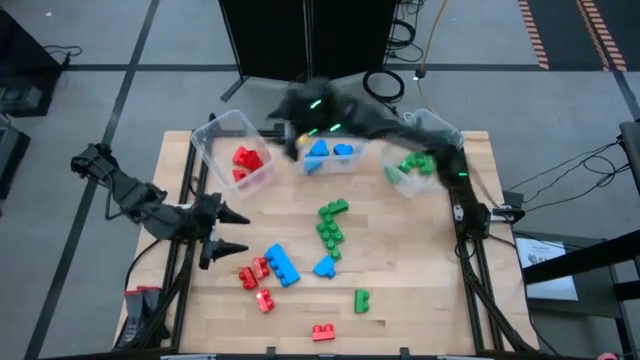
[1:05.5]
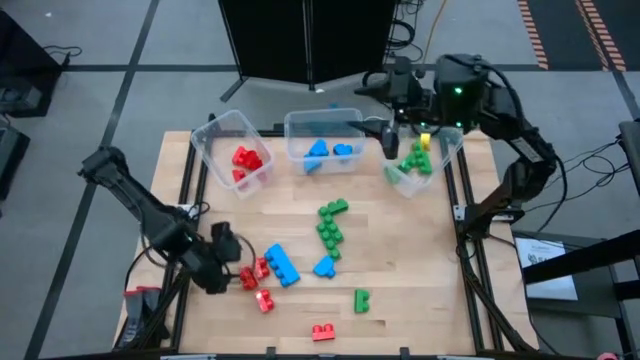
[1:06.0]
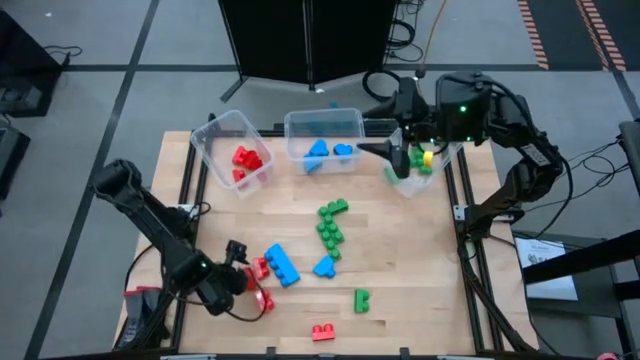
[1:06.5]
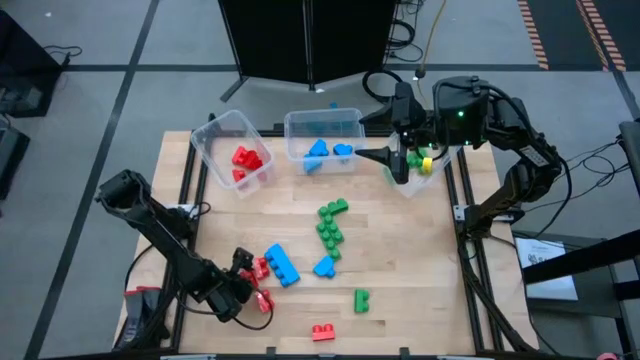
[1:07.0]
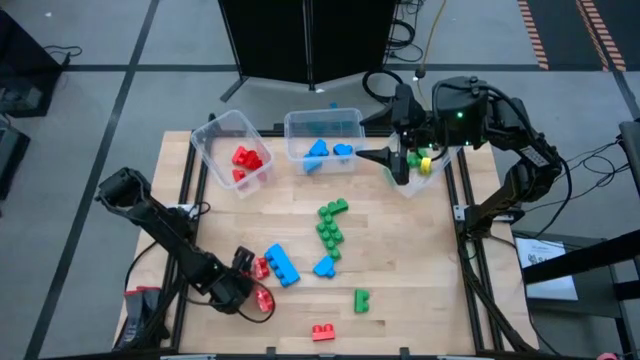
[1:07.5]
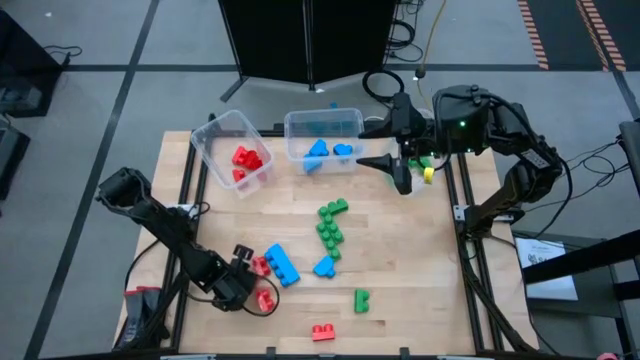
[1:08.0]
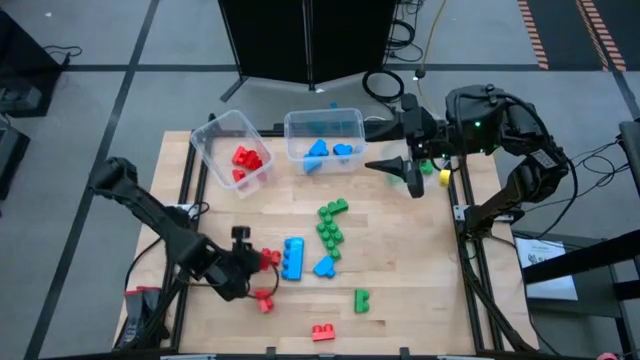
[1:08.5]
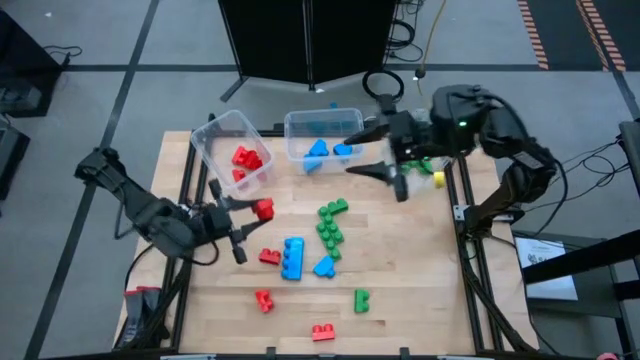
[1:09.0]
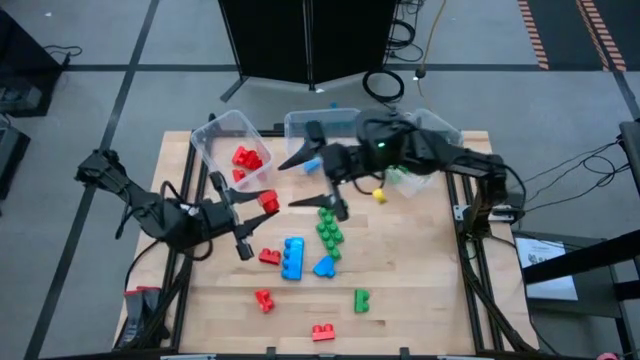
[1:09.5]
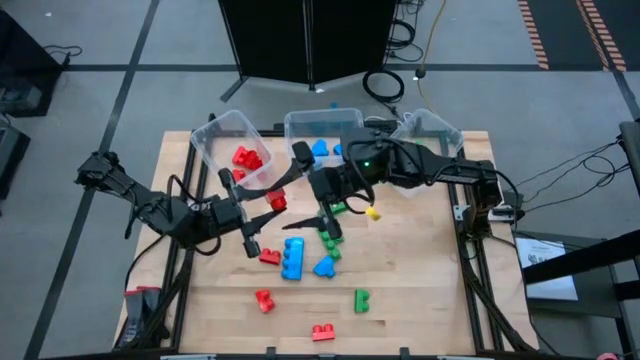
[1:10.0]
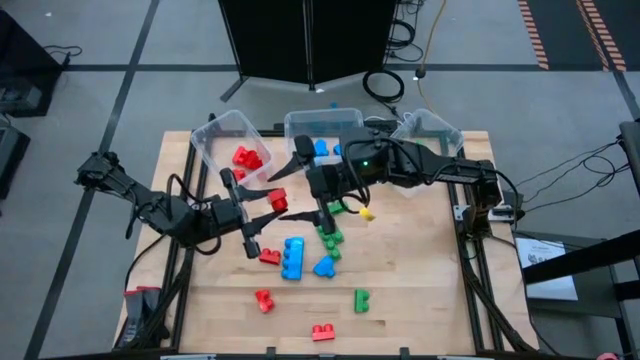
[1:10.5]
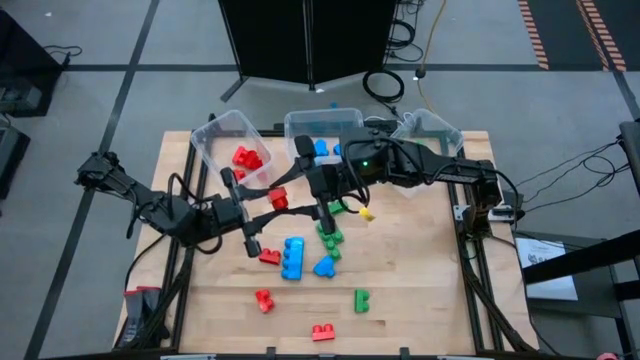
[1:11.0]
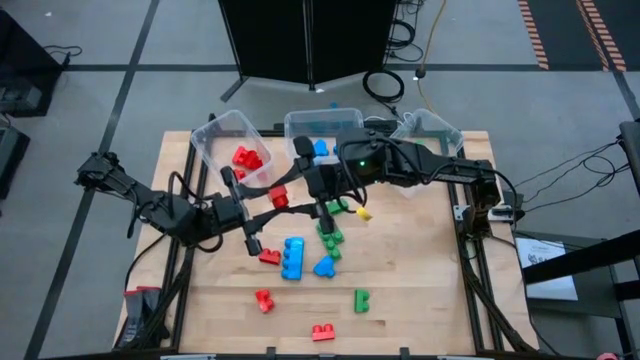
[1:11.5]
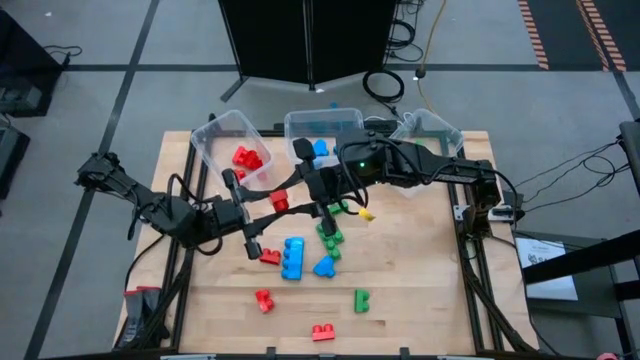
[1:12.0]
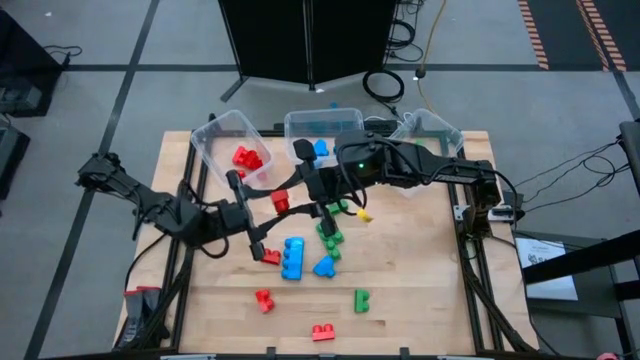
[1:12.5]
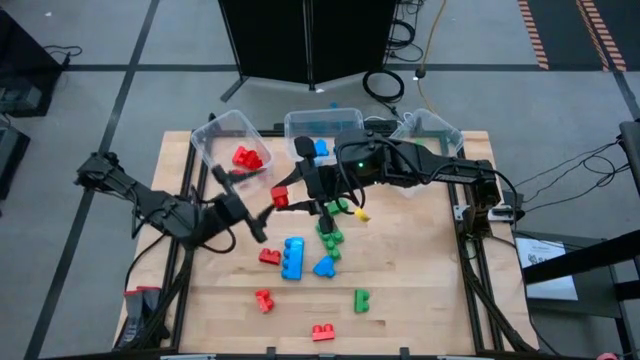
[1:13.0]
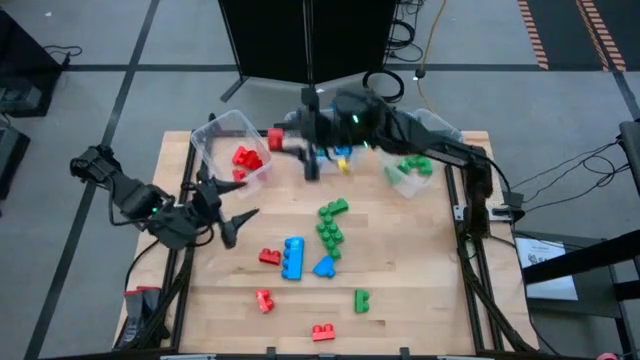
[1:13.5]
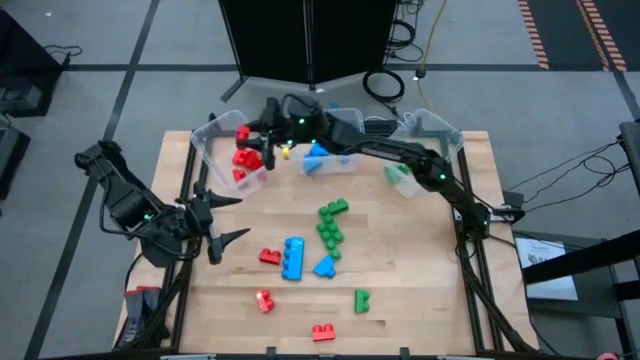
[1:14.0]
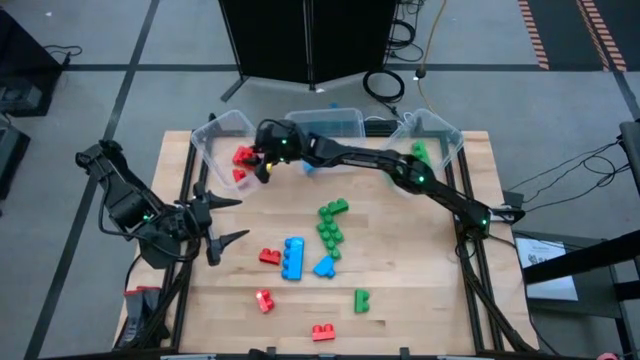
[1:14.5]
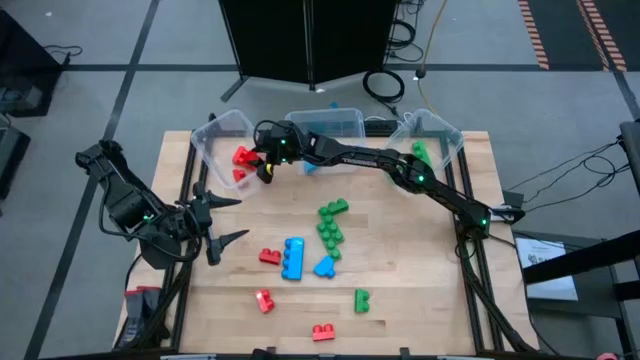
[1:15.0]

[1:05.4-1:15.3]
Task: Sort blocks
Put the red game piece into the left transparent bin

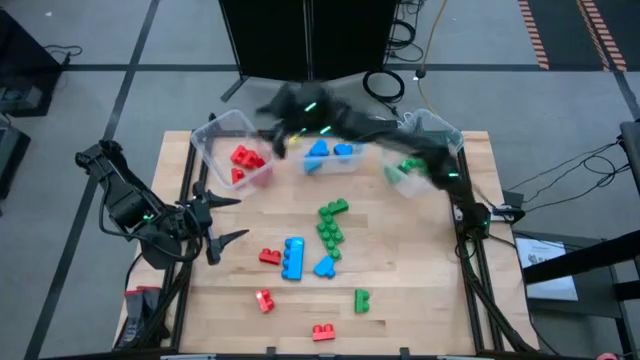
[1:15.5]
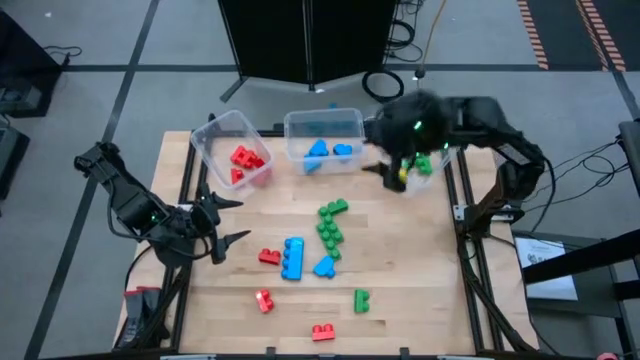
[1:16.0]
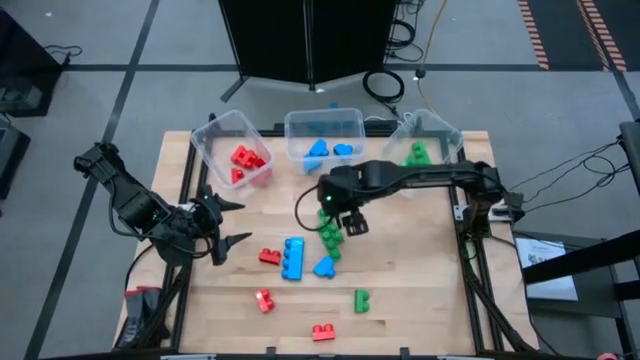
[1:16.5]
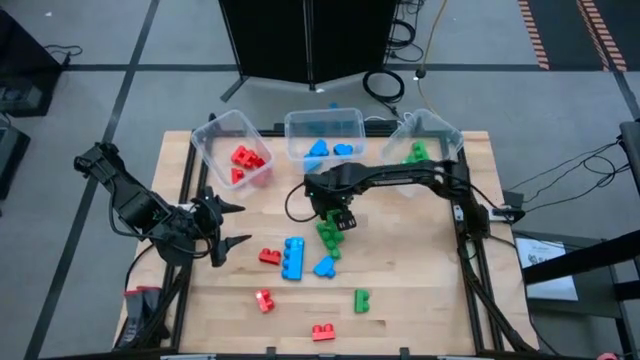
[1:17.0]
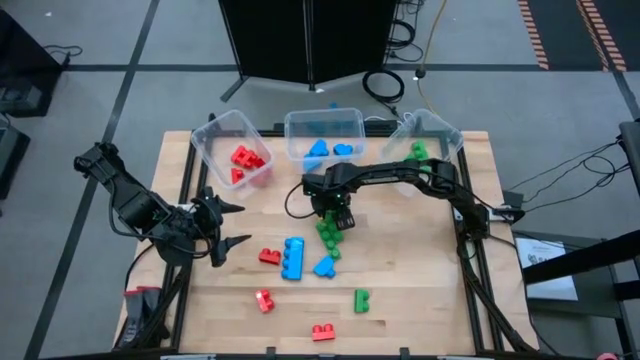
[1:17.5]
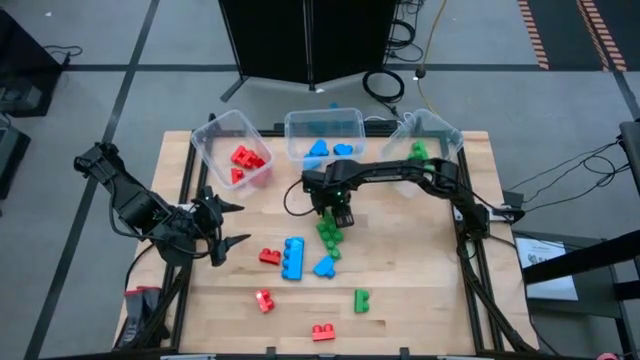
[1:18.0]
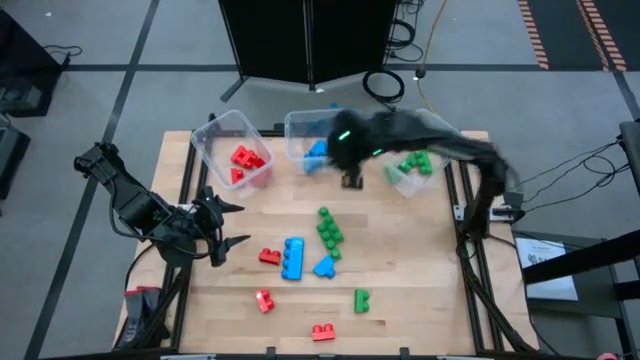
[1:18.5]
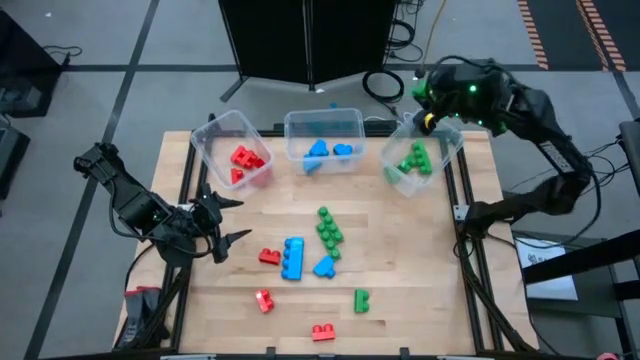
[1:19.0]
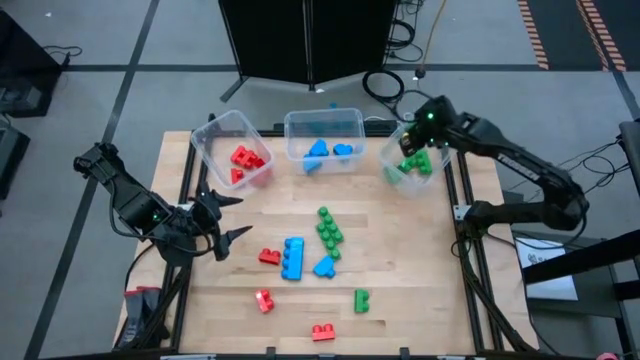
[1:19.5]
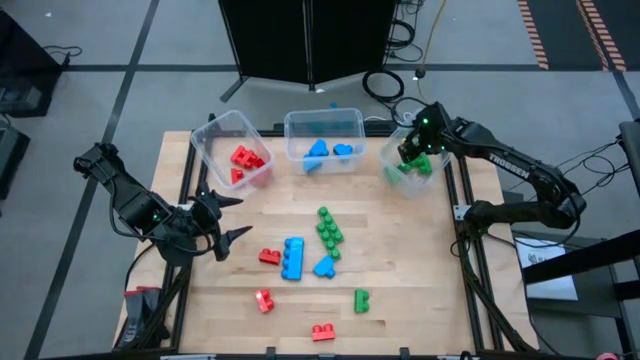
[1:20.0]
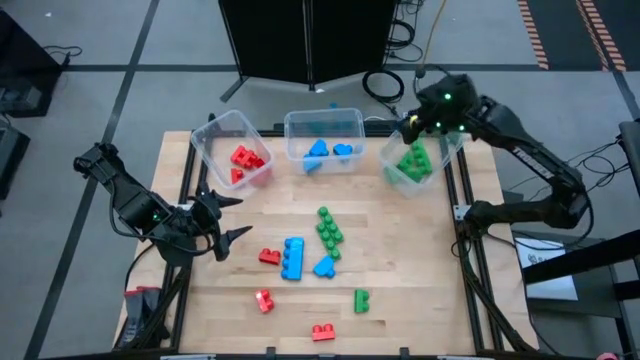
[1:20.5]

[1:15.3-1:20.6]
Put the green game piece into the right transparent bin

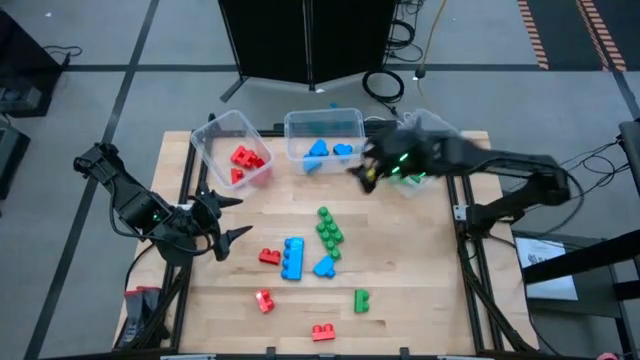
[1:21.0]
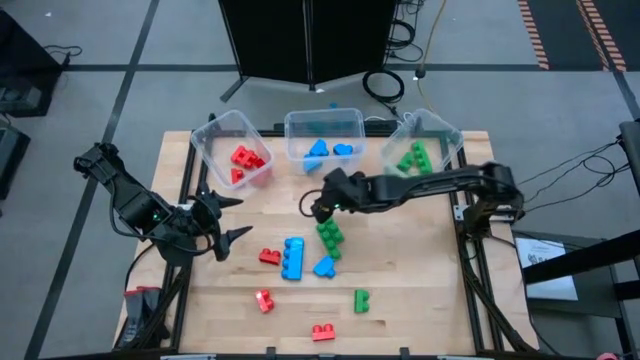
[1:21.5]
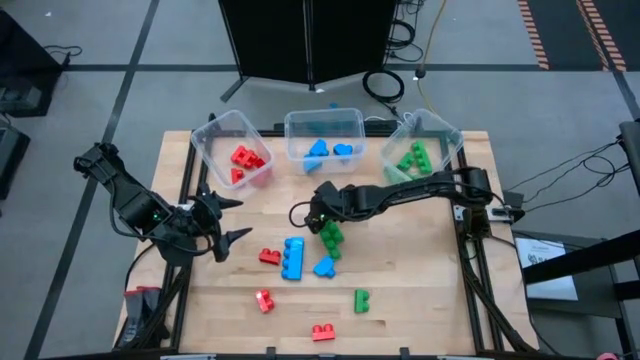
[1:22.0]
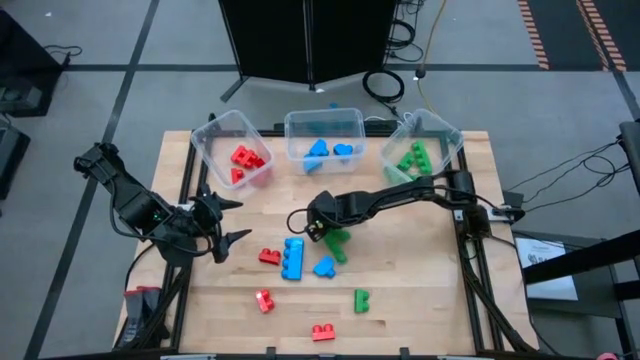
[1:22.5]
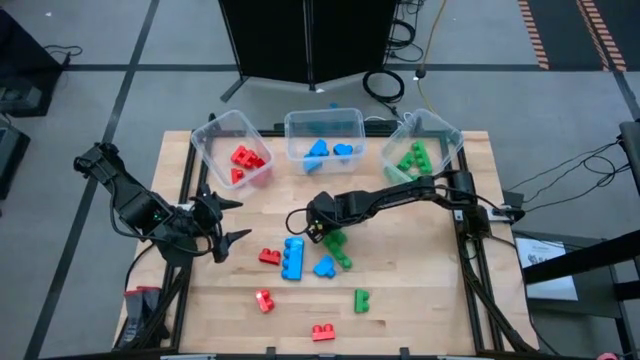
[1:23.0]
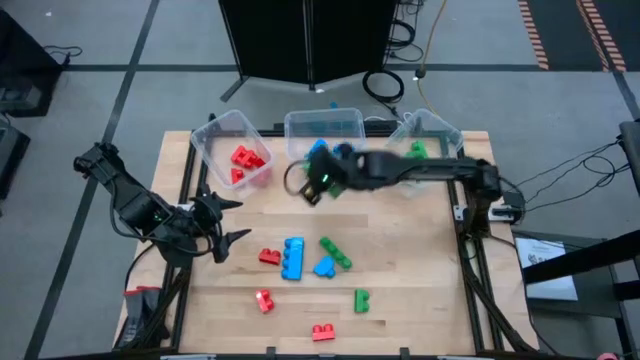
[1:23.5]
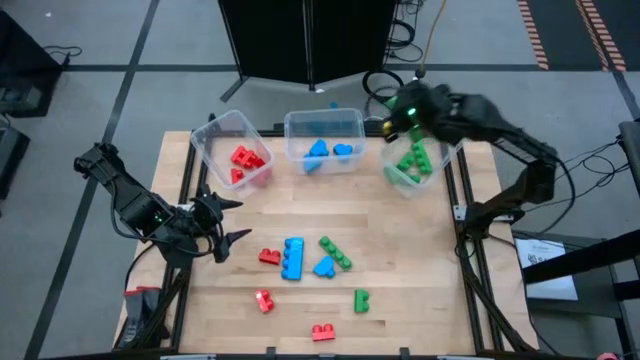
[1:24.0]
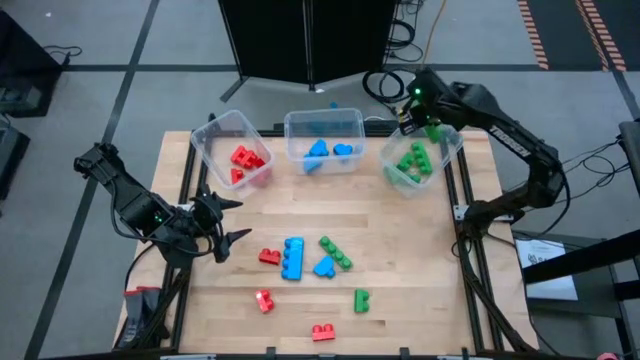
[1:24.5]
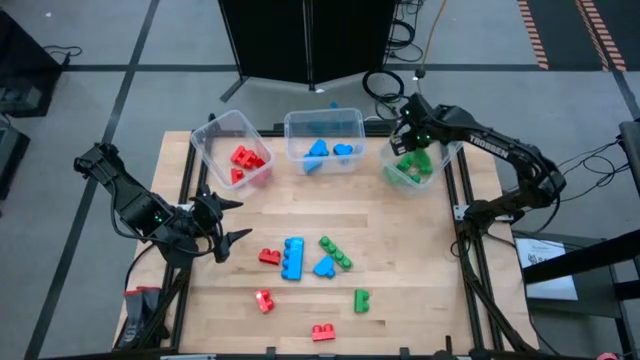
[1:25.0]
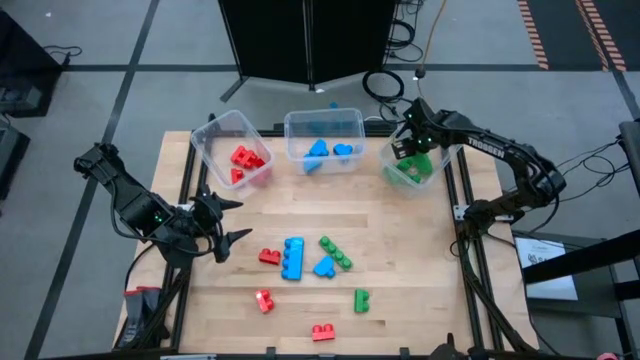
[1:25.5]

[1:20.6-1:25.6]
Put the green game piece into the right transparent bin

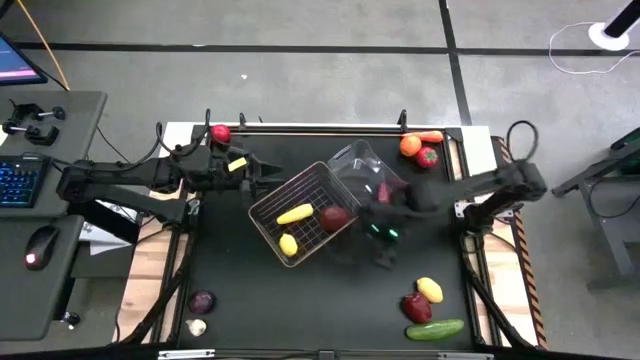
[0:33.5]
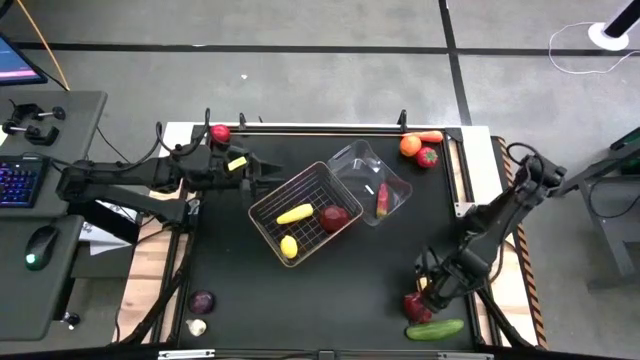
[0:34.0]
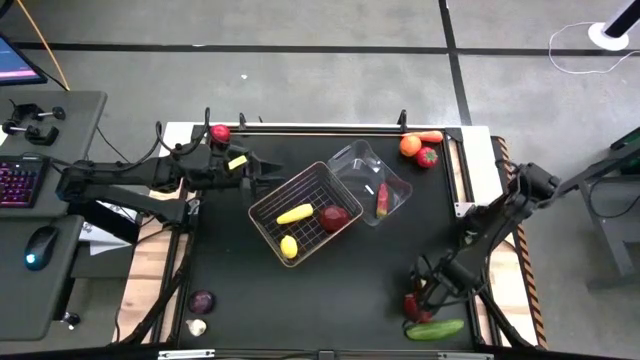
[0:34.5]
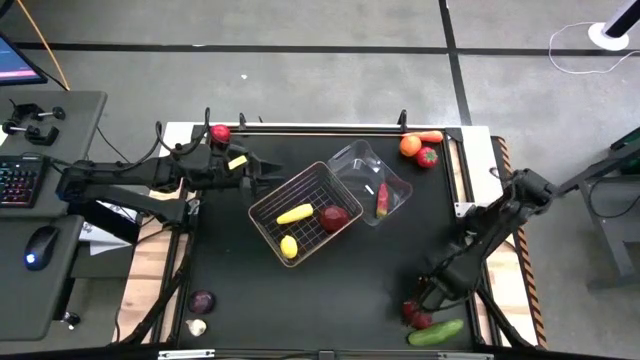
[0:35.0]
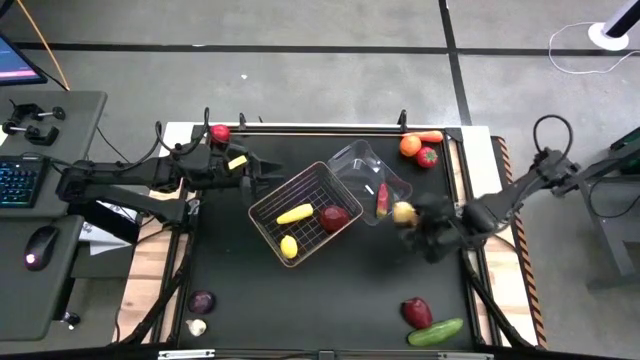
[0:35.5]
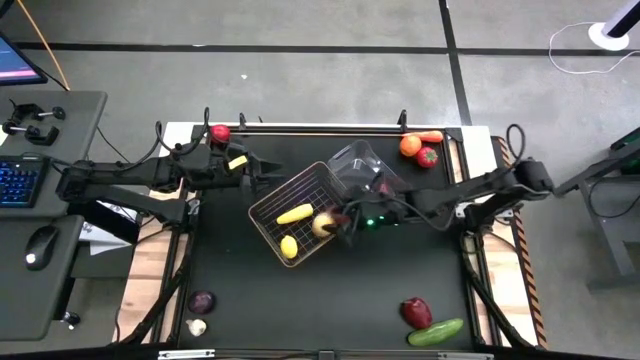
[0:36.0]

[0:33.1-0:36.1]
Task: Sort produce into baskets
Put the lemon into the gold wire basket
